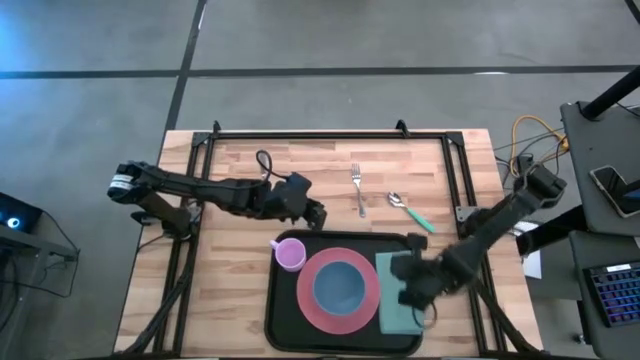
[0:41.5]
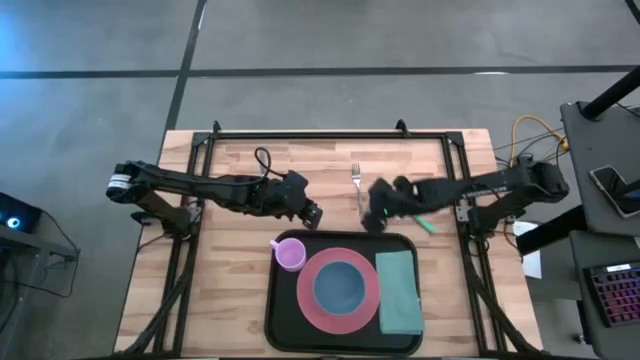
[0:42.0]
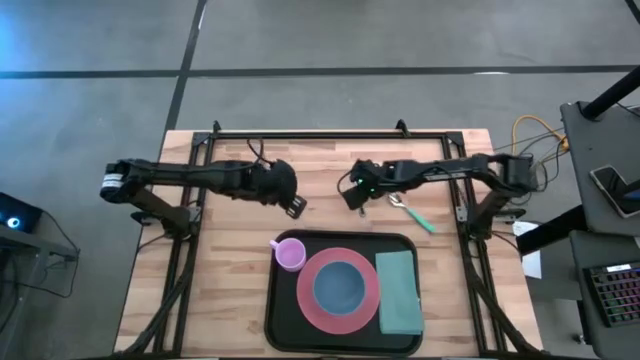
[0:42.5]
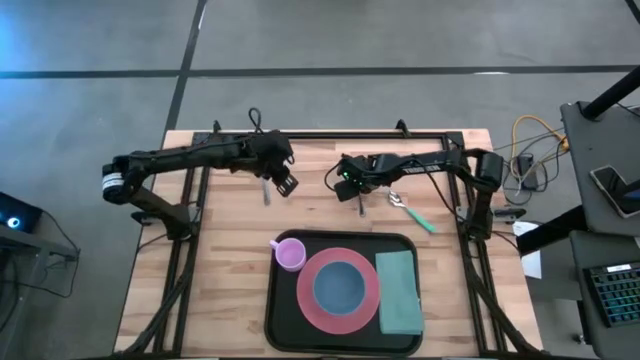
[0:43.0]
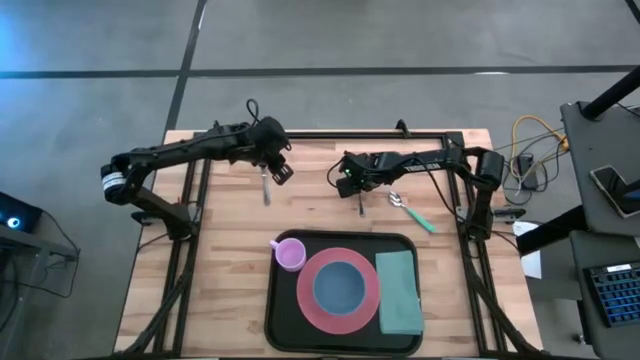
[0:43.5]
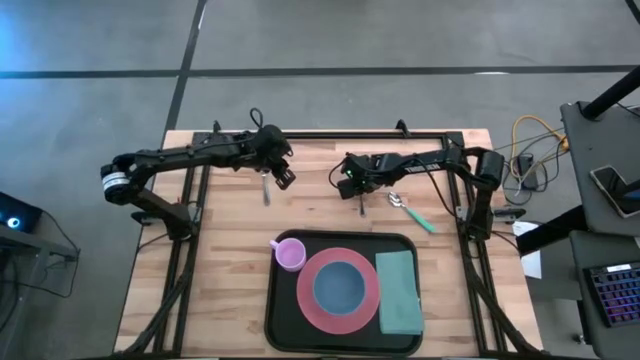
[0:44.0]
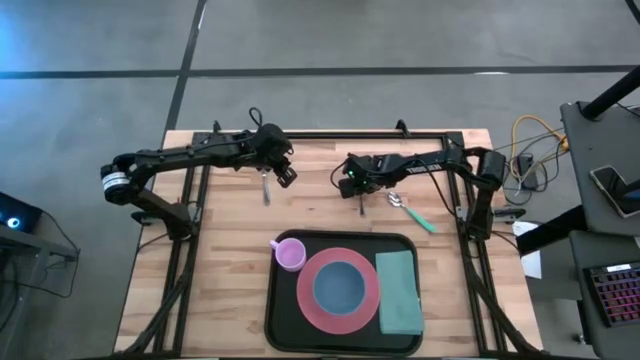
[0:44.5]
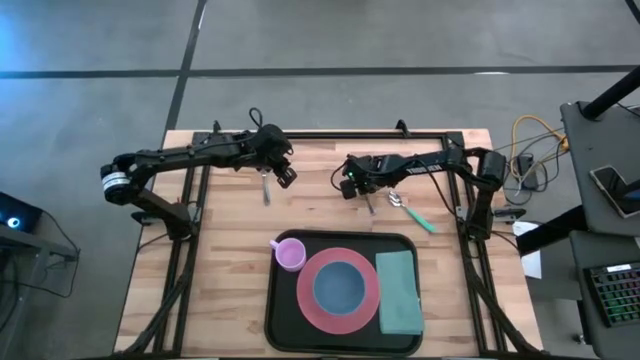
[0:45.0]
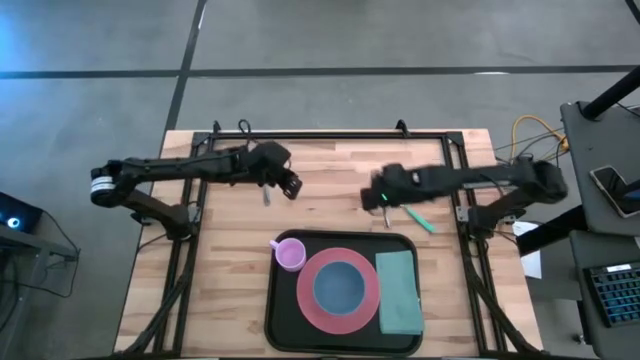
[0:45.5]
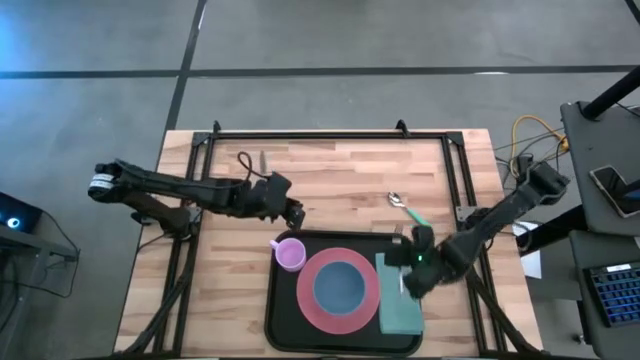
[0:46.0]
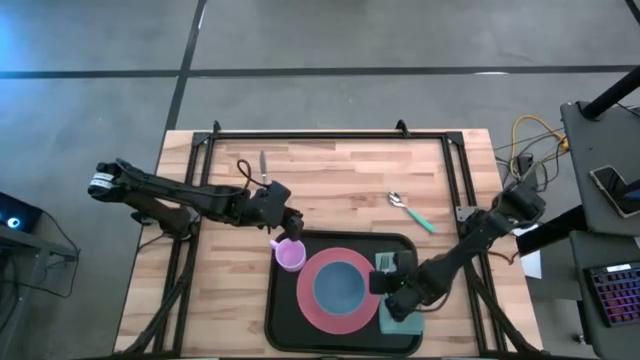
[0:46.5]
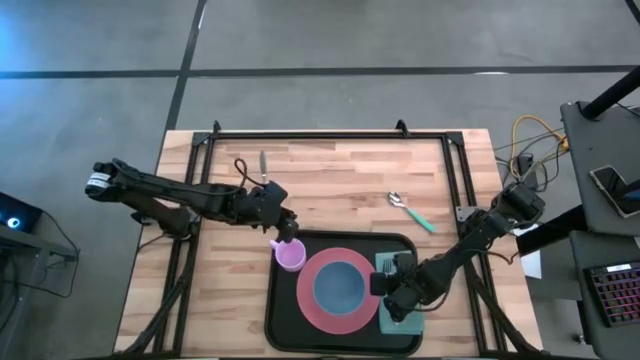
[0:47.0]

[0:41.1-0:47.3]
Task: Set up tray
Put the silver fork on top of the blue napkin on the black tray

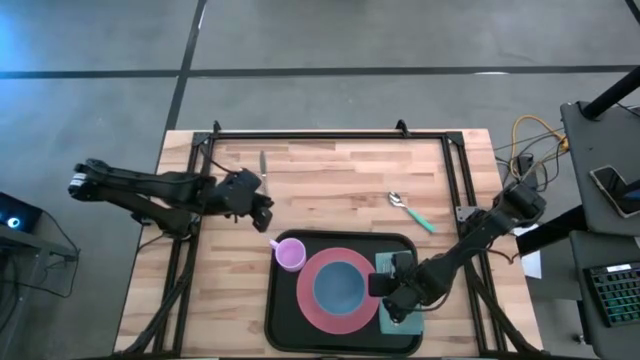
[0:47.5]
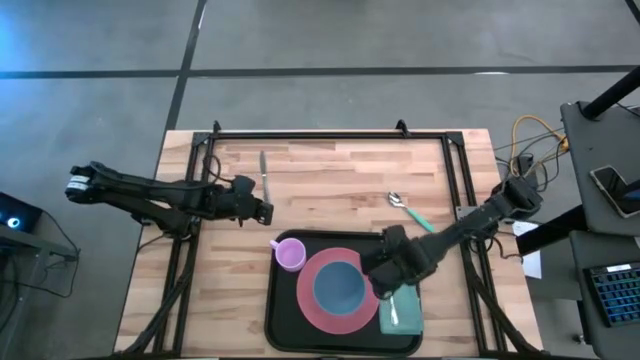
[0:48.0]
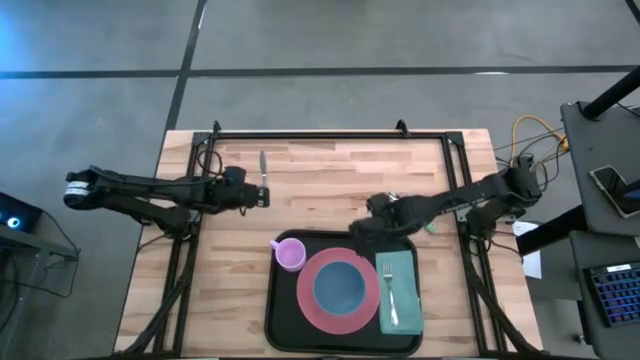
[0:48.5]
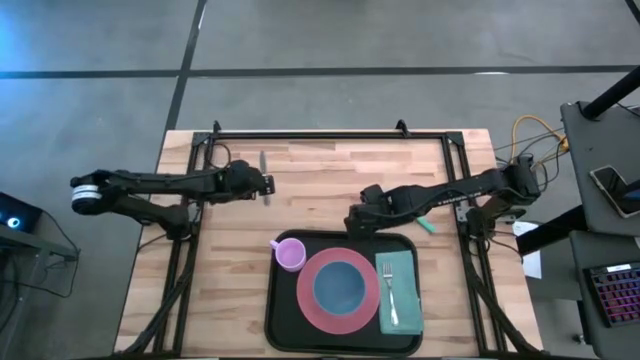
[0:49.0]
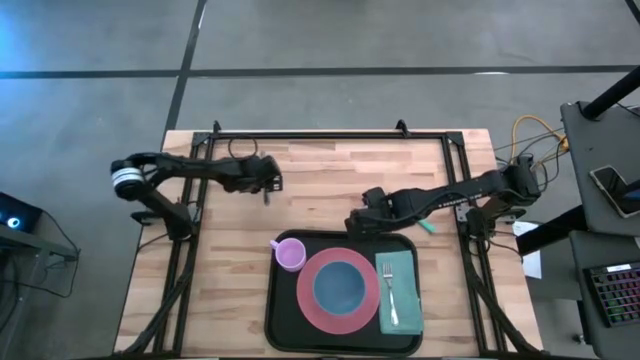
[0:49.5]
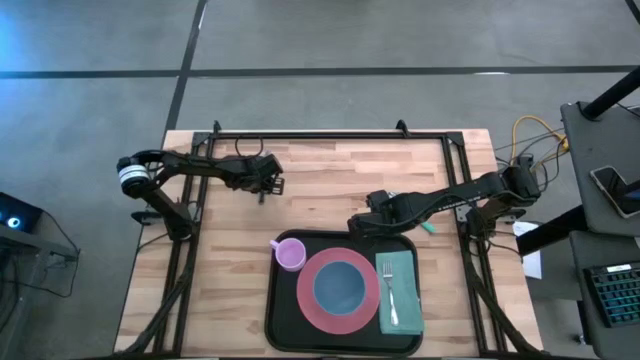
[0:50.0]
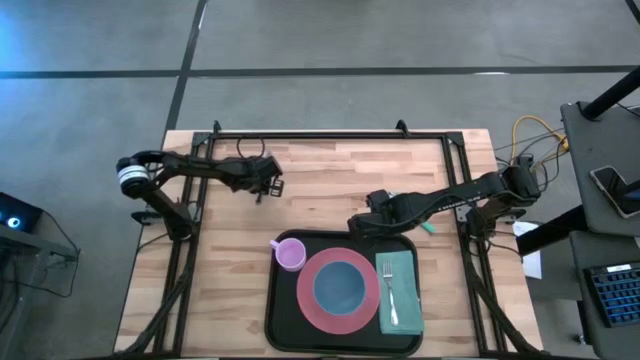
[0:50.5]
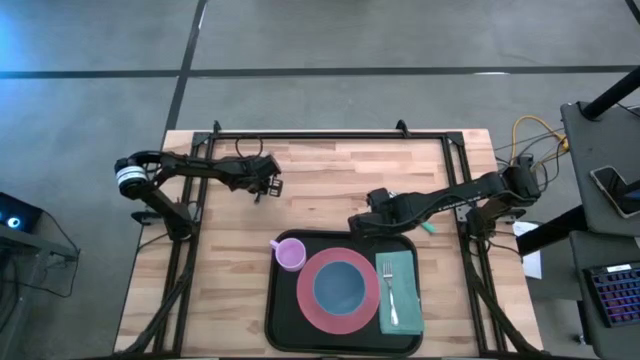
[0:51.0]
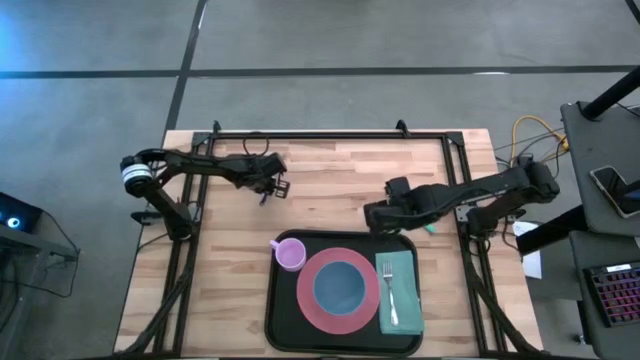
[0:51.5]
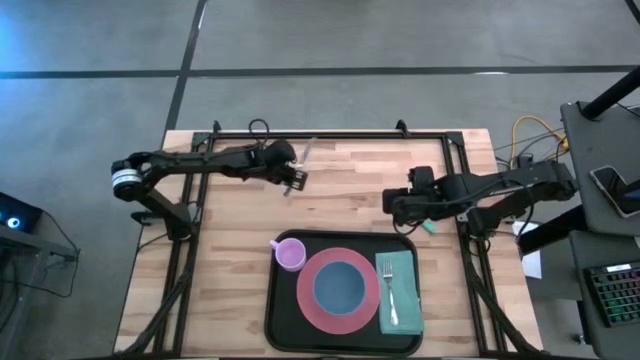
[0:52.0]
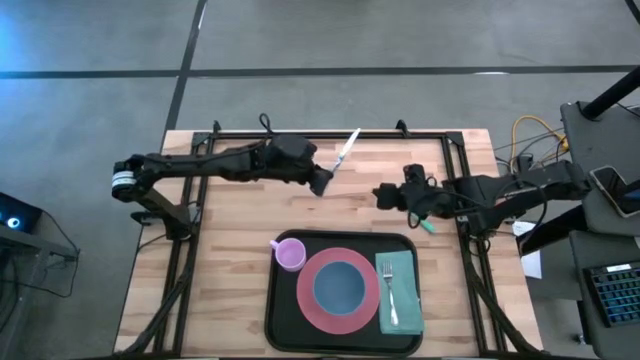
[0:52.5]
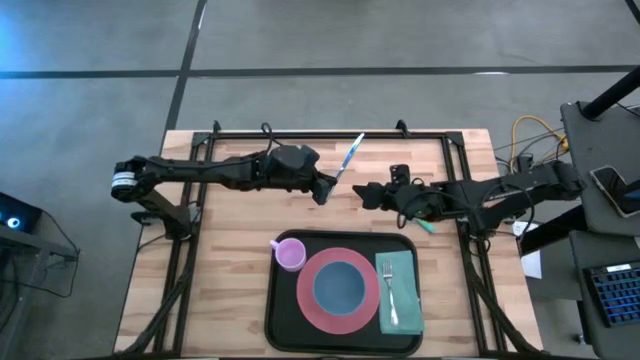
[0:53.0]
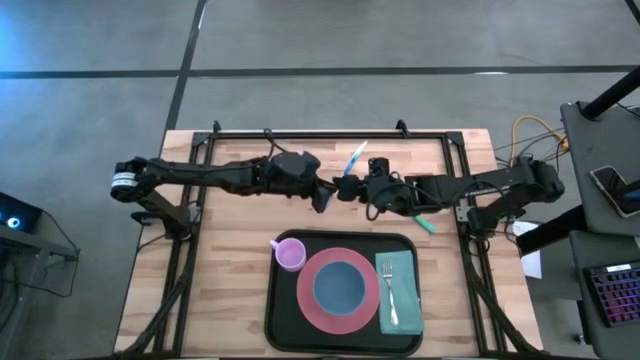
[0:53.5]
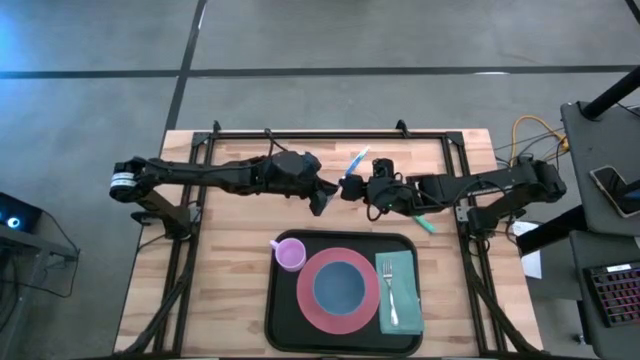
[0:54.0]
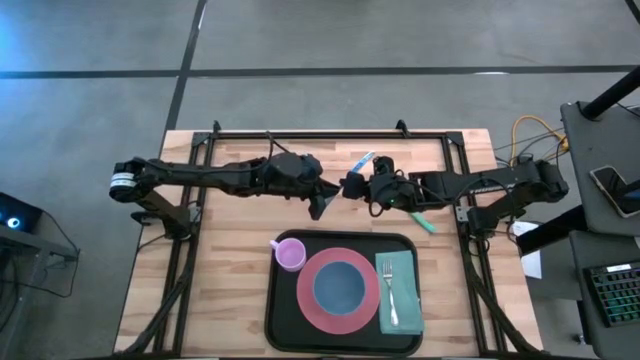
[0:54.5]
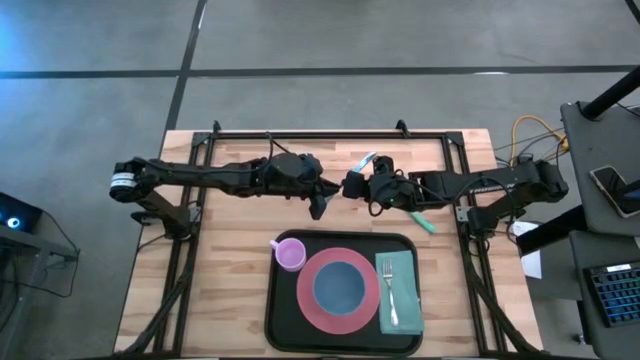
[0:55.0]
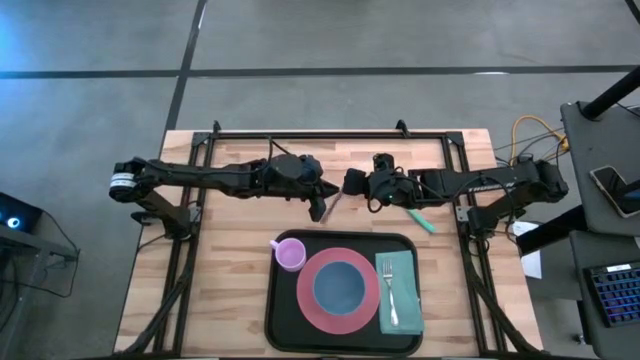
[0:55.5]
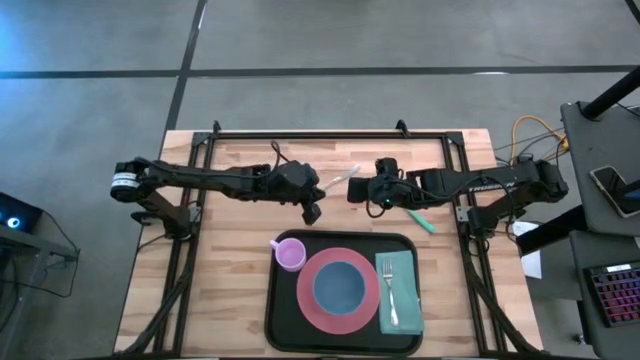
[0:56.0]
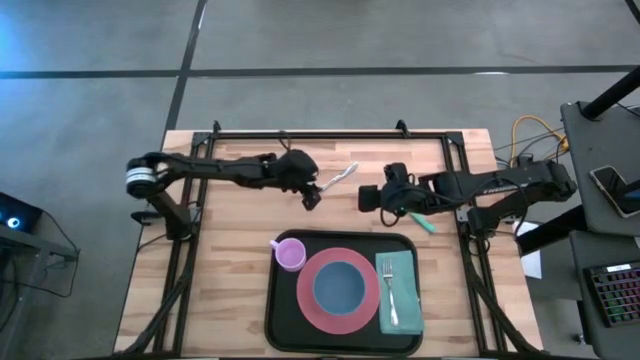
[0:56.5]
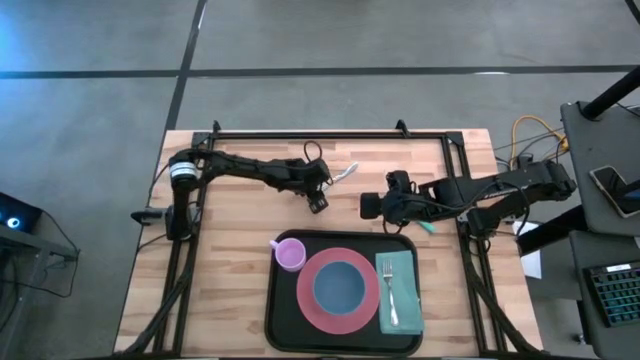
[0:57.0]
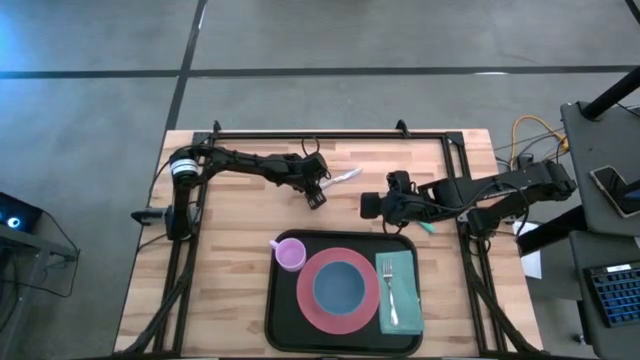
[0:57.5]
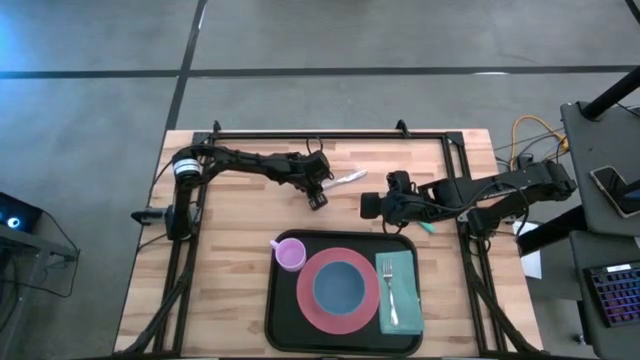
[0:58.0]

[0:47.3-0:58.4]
Put the silver knife to the right of the silver fork on the blue napkin on the black tray

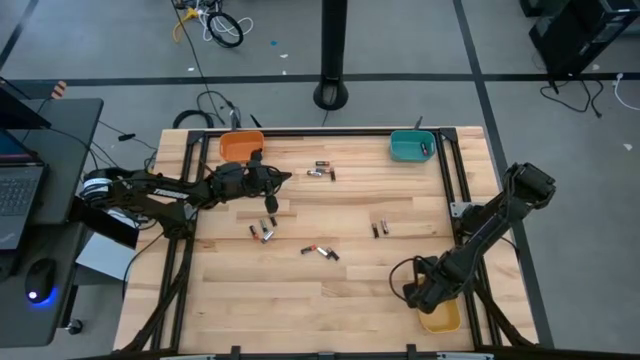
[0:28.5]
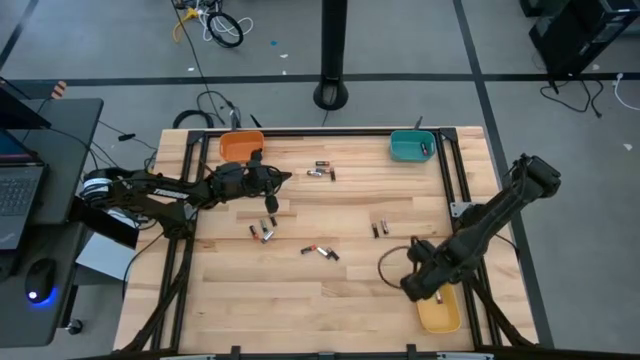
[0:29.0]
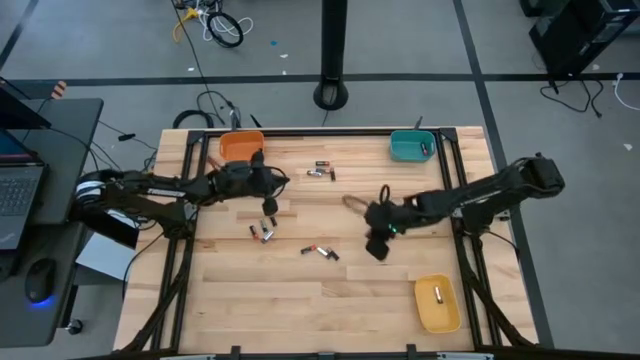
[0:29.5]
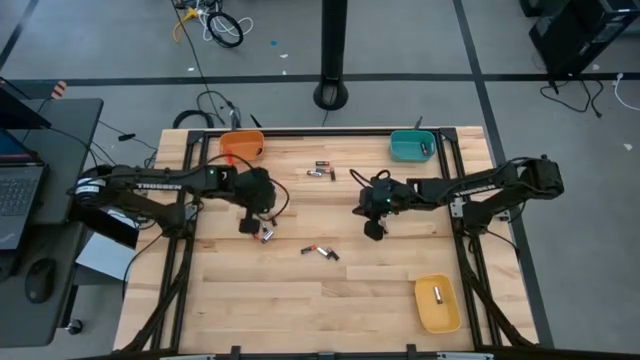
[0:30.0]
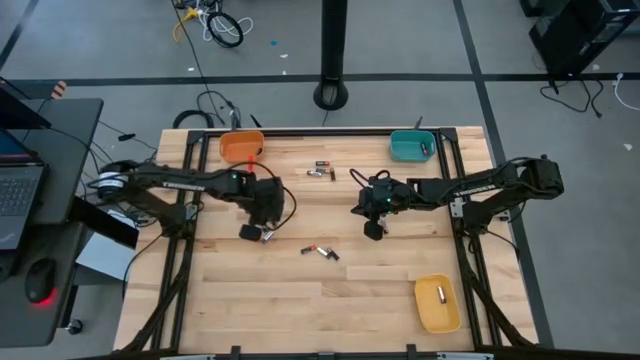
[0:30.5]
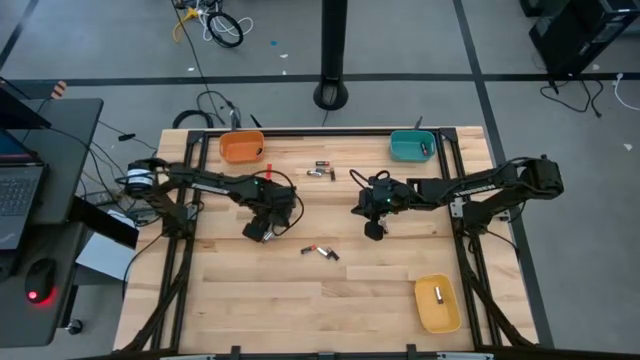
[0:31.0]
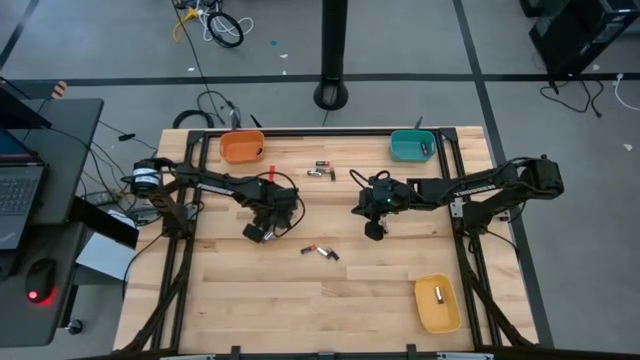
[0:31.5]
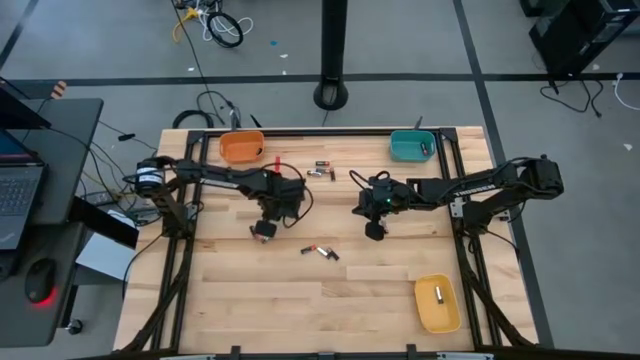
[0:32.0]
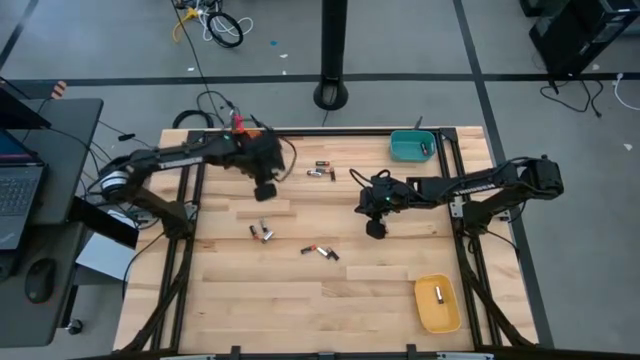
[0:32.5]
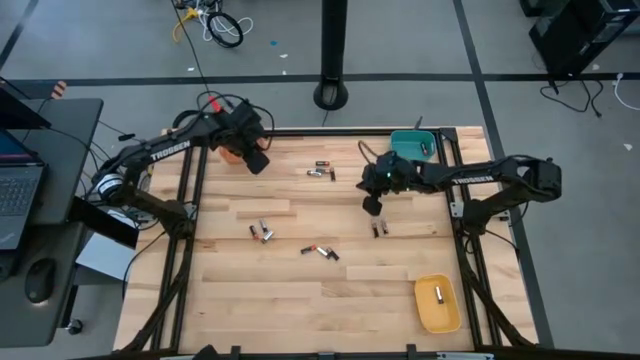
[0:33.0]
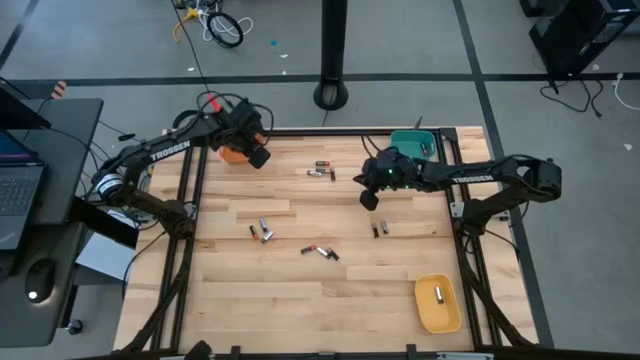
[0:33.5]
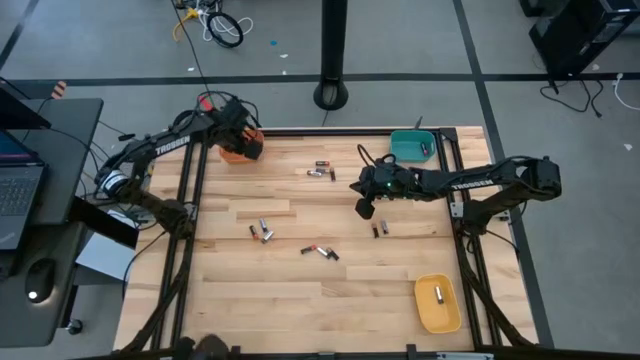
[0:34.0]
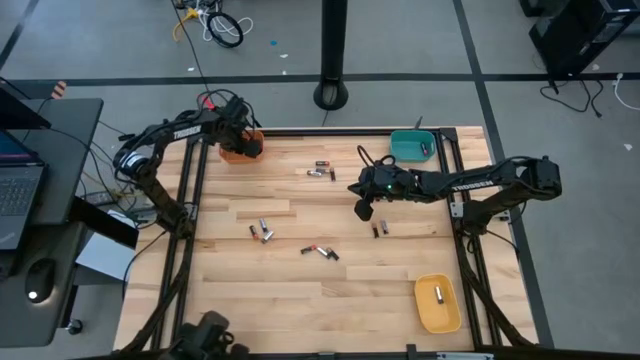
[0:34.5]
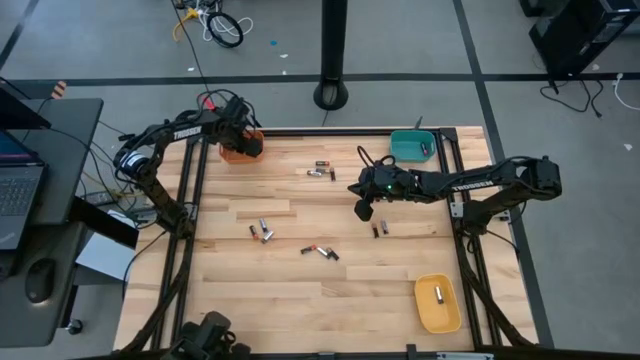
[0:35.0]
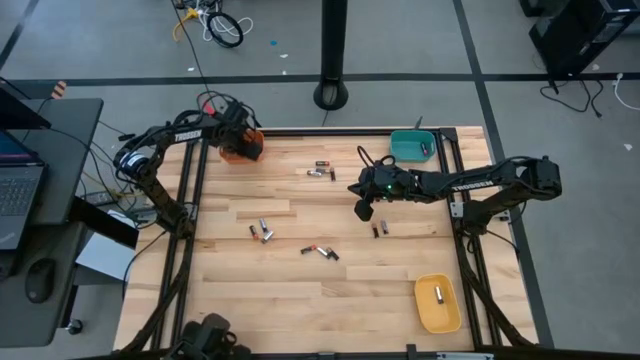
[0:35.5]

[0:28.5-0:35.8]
Task: Sort batteries
Put the black-orange battery into the orange bin
